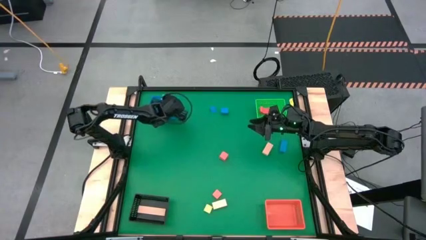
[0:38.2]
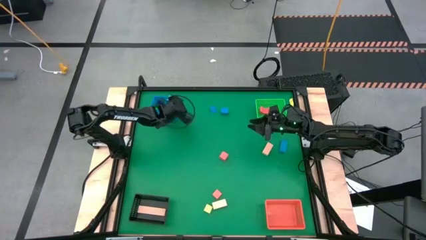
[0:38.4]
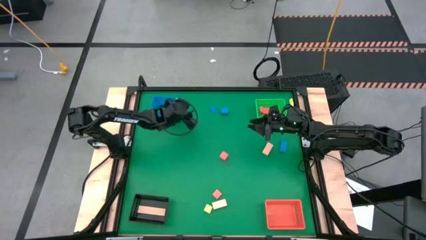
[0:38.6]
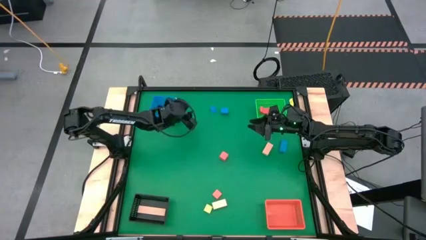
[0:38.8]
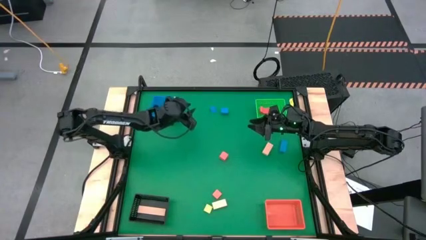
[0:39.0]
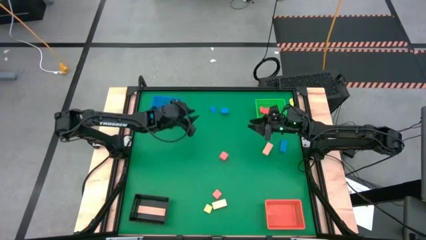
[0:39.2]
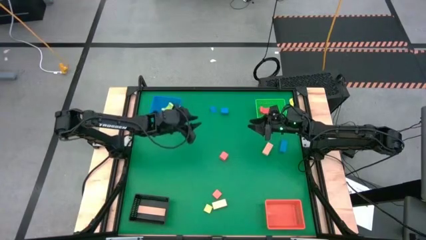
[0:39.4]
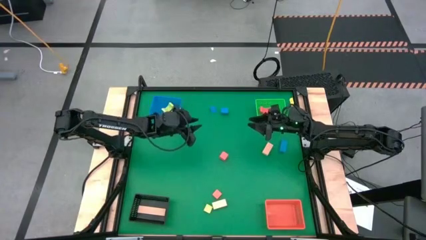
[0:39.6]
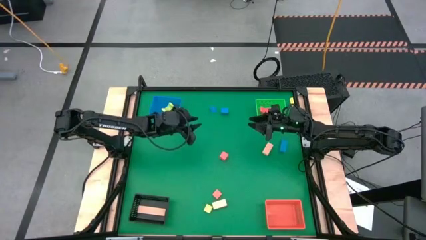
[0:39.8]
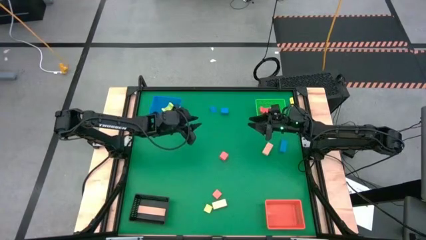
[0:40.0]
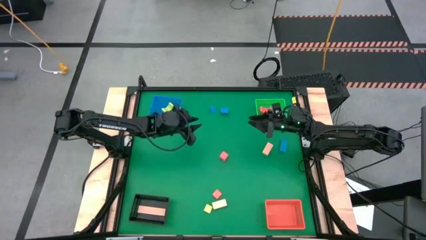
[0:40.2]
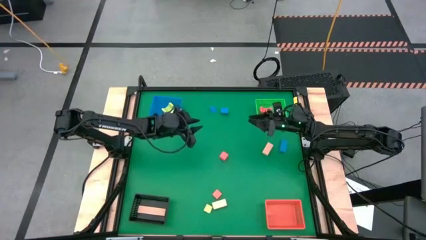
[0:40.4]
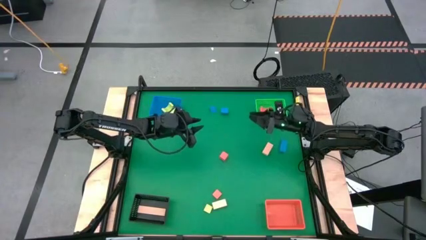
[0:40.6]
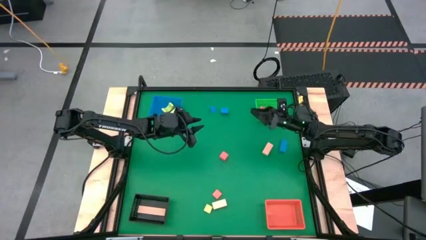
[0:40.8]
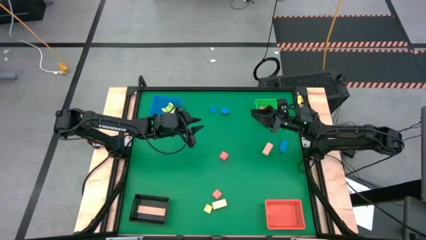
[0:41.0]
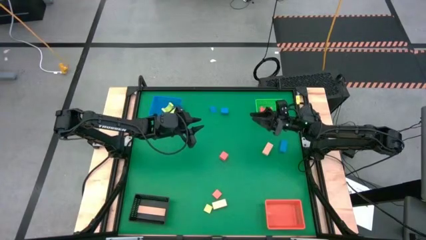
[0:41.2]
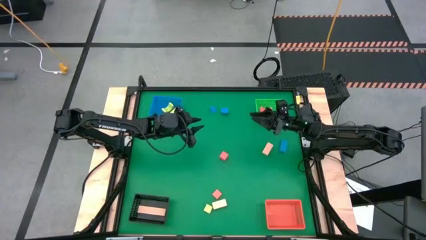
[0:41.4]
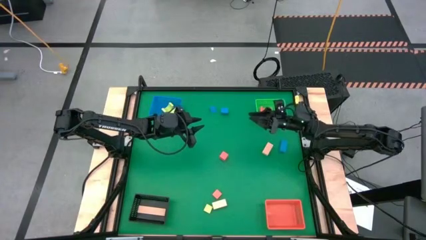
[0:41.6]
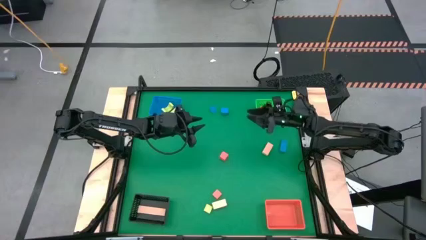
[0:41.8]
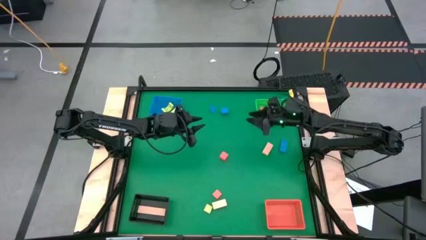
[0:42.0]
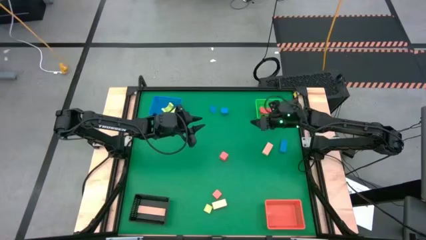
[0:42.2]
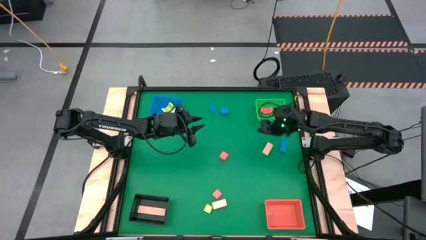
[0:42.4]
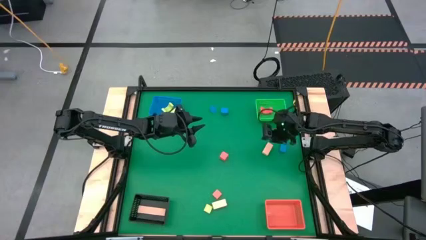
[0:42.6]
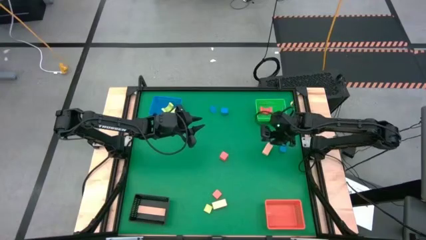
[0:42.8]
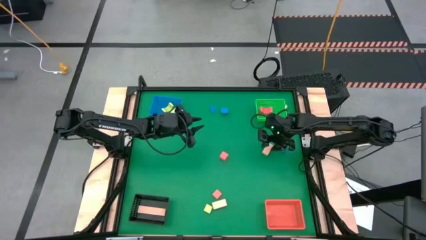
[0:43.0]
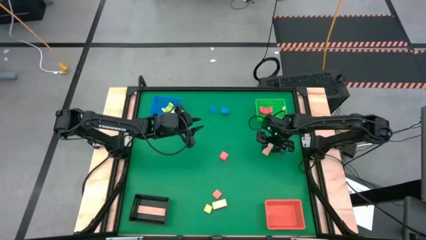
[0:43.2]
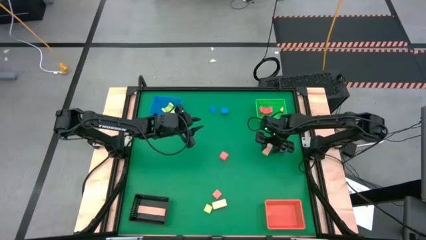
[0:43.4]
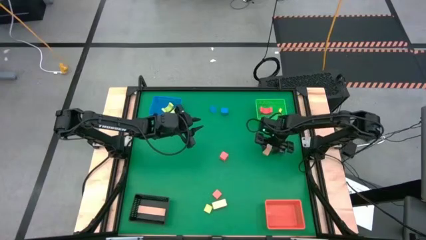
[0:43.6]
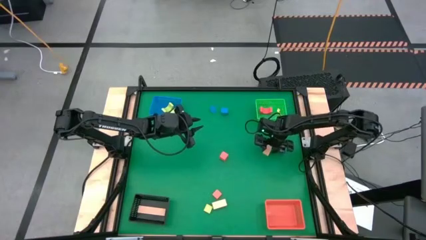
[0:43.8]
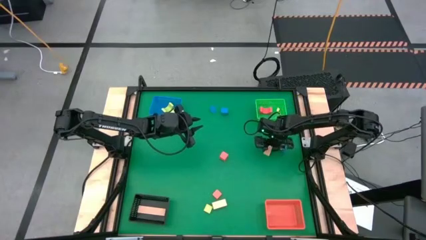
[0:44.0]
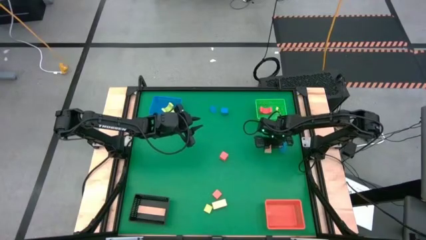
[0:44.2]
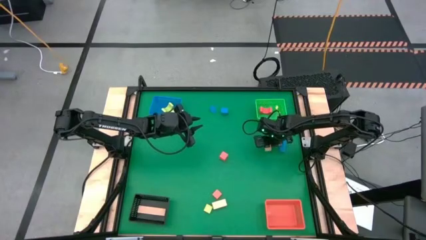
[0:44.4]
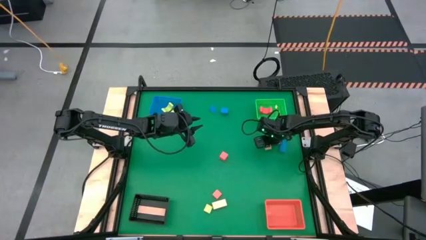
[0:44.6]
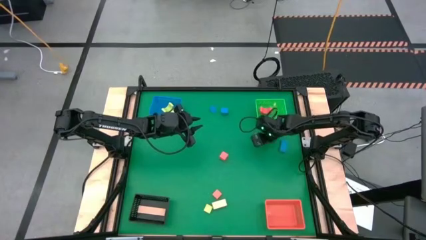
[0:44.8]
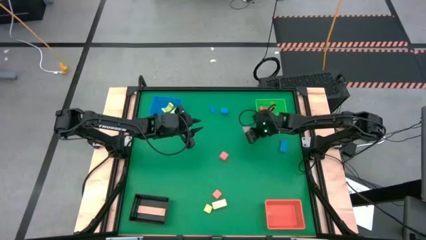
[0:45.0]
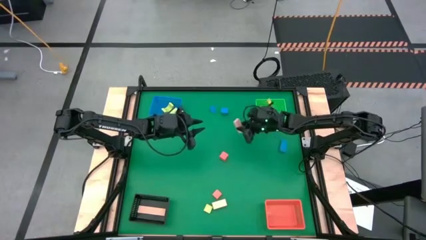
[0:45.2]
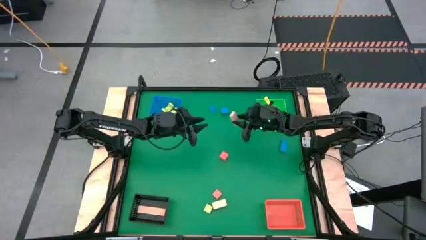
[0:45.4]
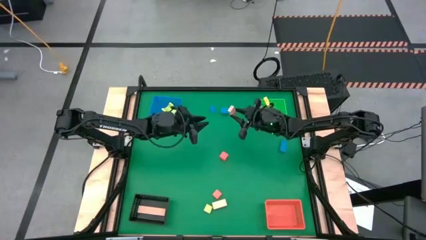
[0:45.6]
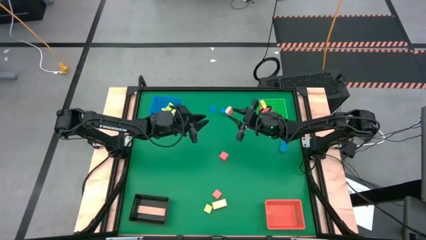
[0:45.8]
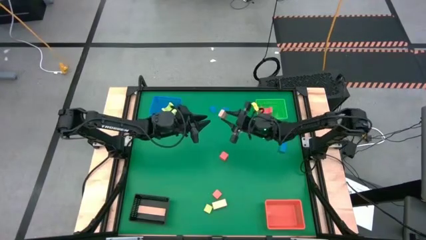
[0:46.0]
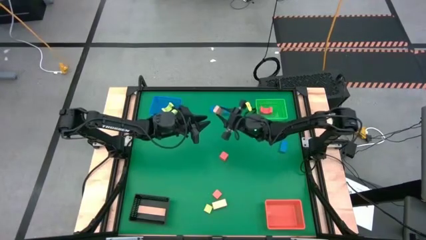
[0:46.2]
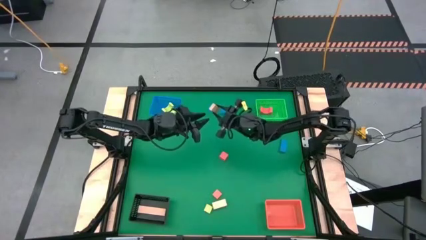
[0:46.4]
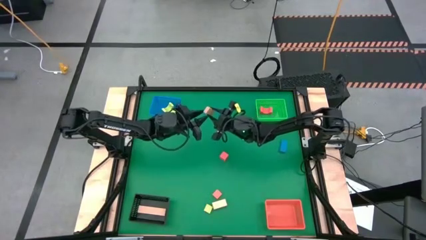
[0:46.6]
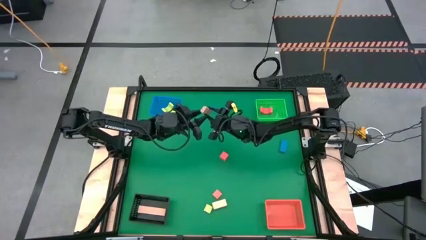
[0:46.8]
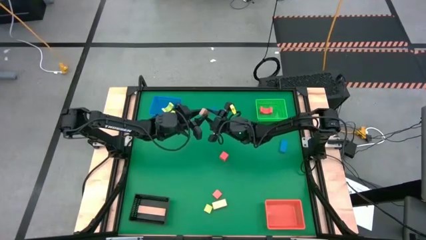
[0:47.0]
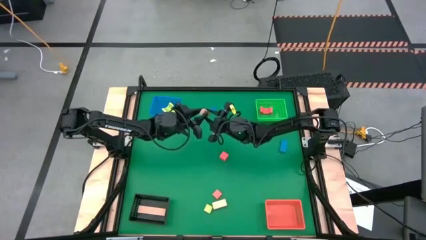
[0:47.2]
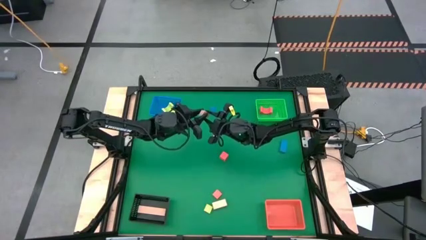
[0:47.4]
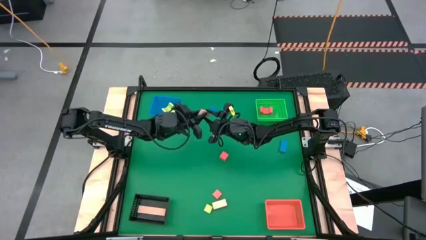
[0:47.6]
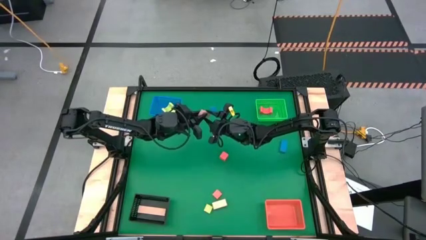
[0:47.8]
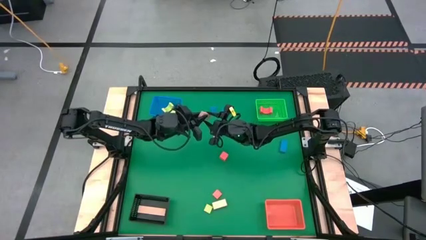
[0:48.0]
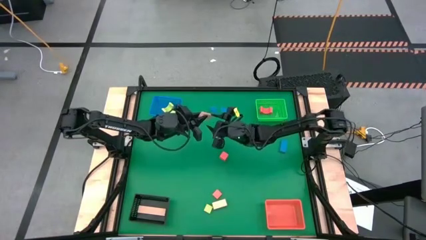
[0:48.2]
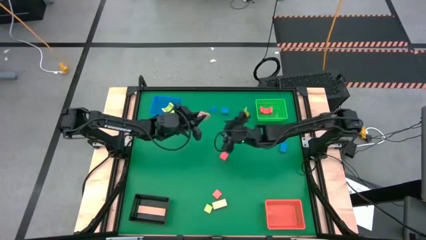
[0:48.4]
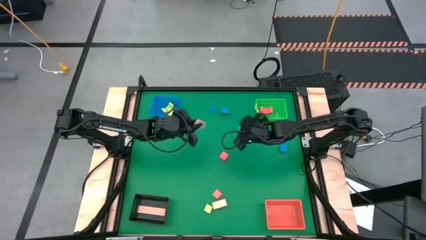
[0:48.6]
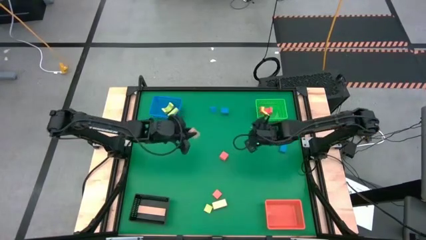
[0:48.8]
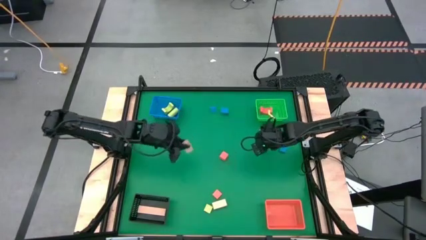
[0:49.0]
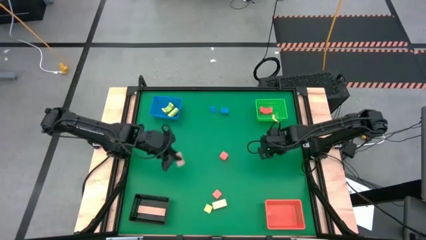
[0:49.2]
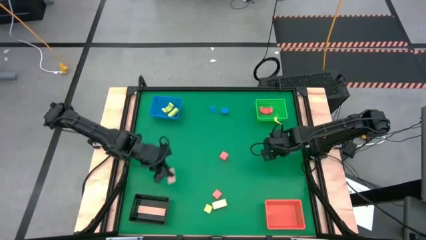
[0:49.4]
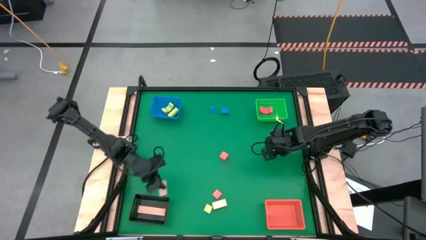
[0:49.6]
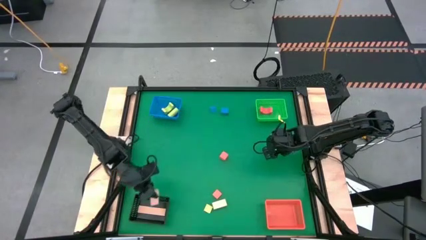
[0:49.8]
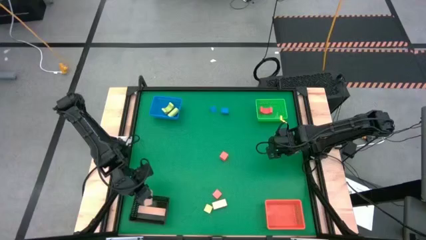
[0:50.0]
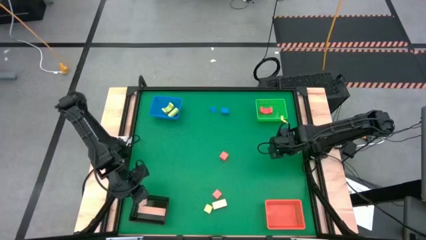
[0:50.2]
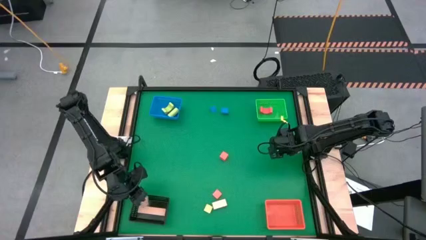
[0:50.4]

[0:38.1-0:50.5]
Task: Sort & place blocks by color
Put the top brown block into the black bin

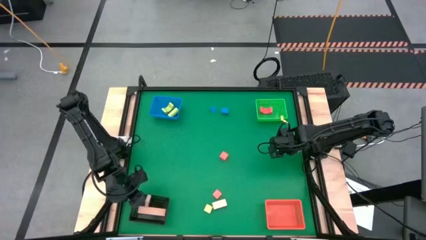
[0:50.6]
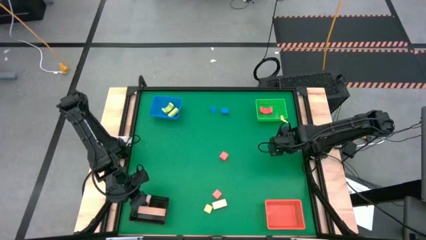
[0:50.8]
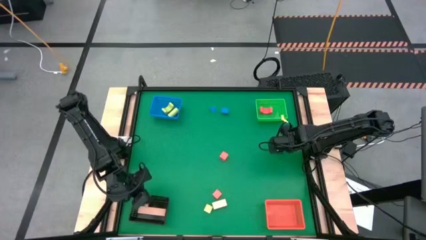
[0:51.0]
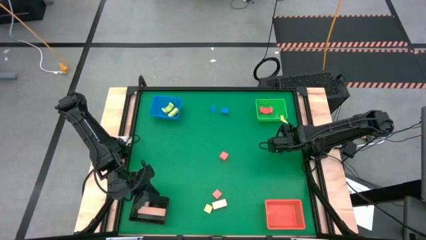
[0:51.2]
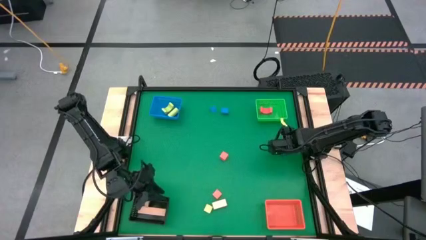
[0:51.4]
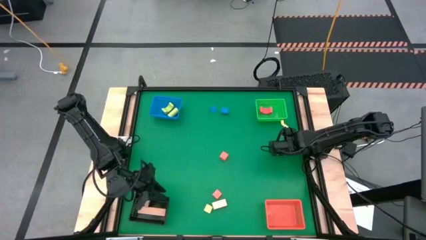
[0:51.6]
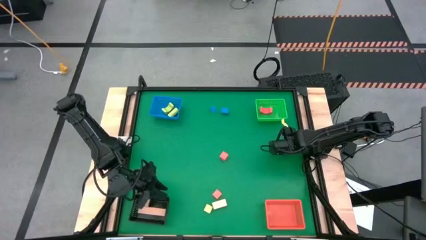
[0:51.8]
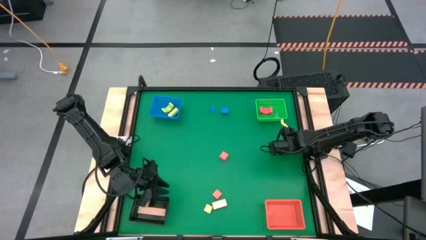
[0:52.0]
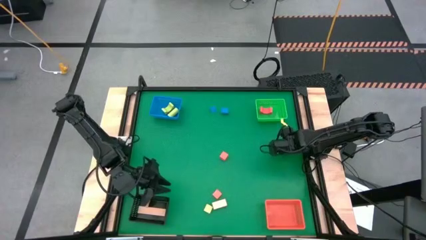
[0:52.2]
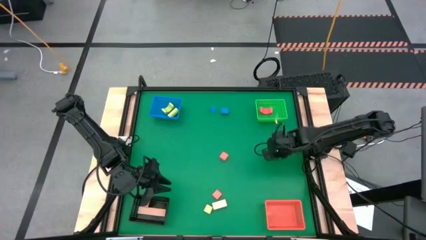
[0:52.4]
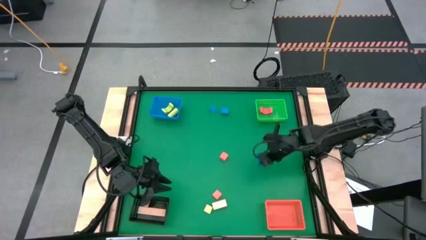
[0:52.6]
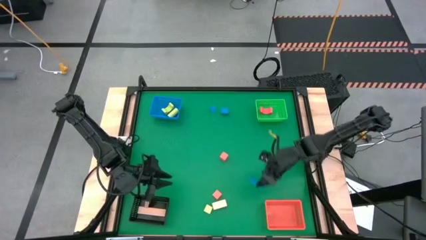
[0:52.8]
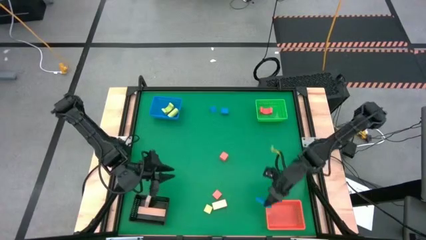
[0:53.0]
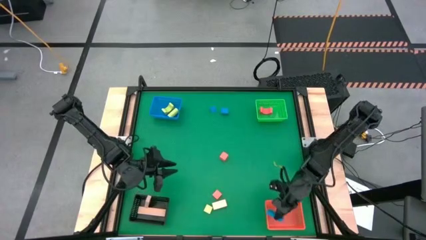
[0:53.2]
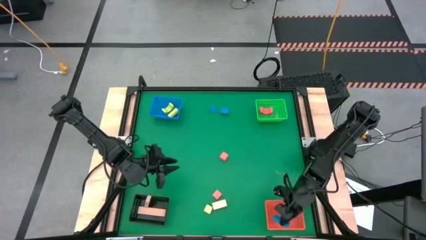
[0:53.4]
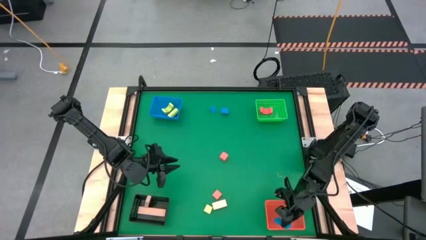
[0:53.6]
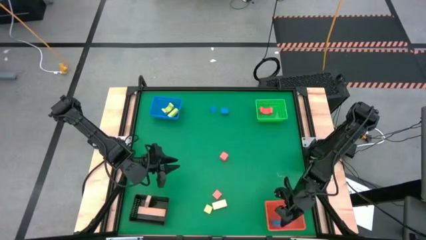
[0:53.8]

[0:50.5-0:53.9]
Put the bottom blue block into the orange bin

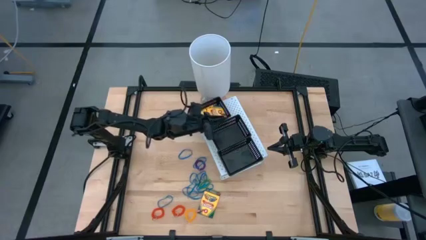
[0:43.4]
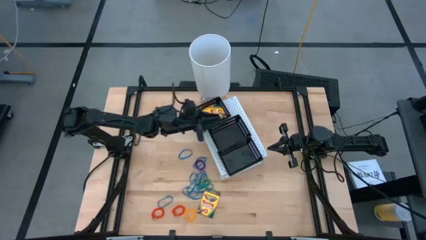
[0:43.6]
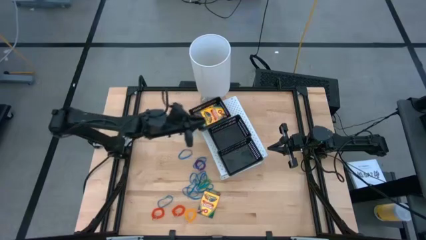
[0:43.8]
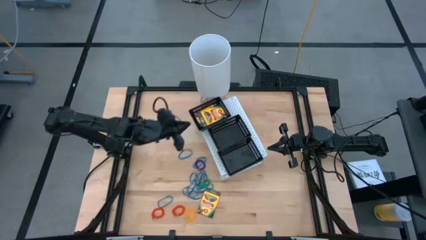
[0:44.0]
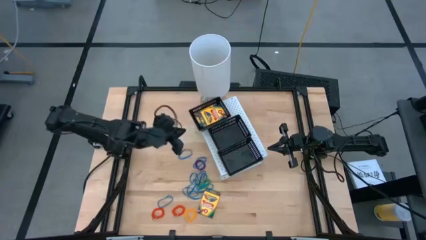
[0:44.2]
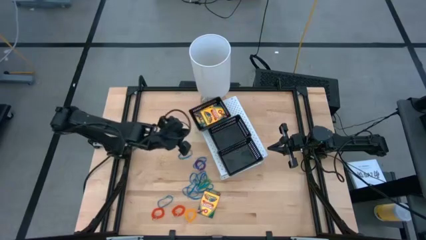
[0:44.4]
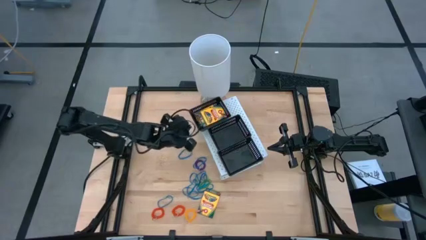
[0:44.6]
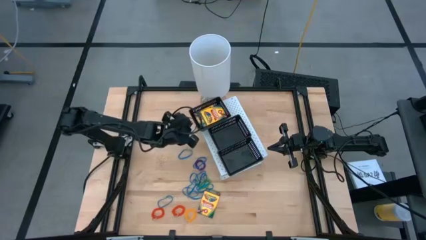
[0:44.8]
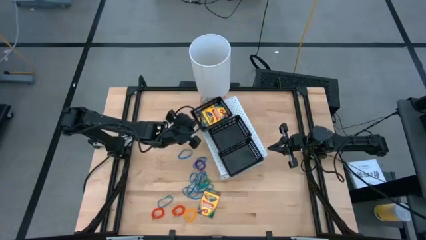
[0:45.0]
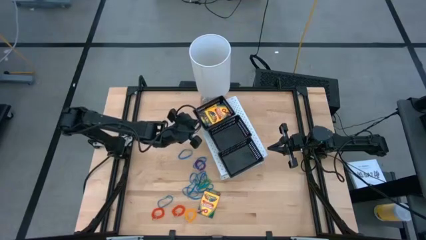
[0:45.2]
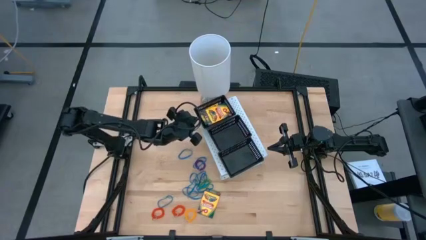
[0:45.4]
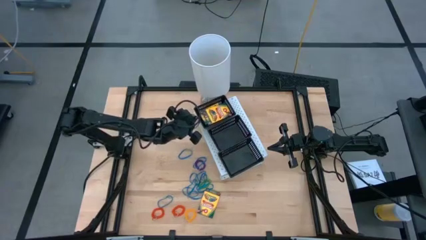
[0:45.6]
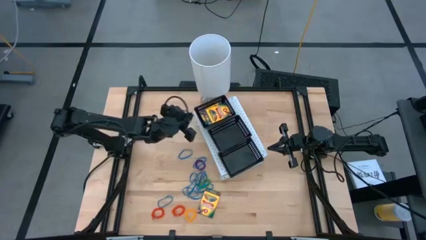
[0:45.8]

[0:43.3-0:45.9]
Task: Pick & Place Office Desk Supplies
Adjust the top black bin on the shelf
